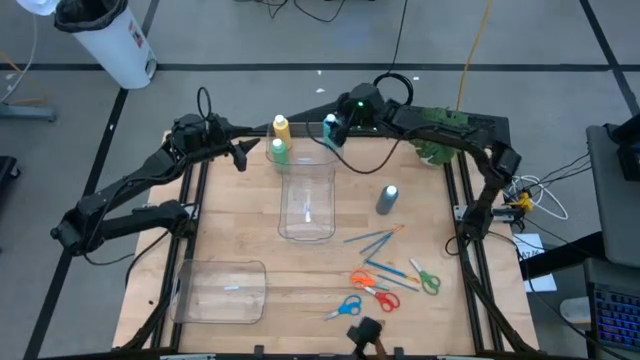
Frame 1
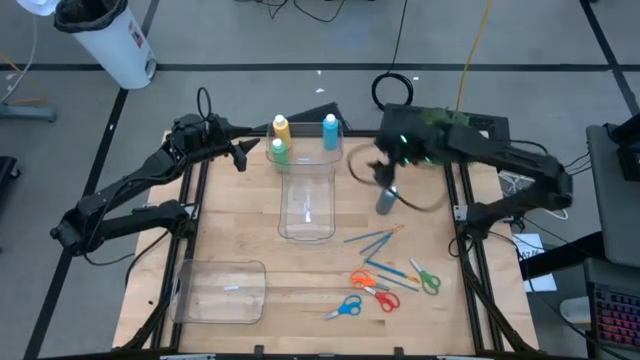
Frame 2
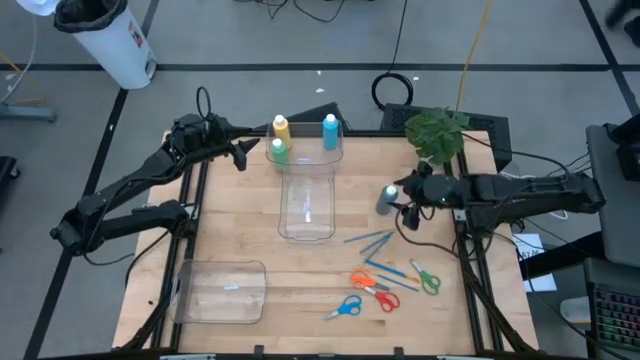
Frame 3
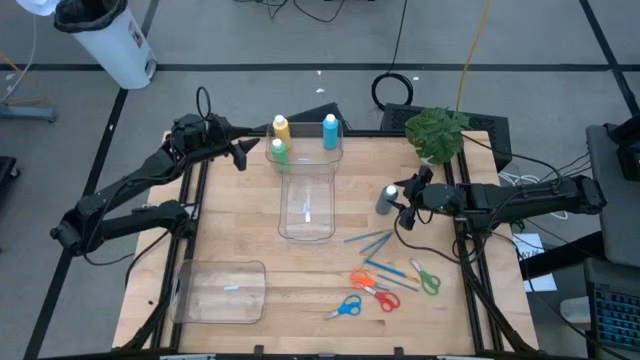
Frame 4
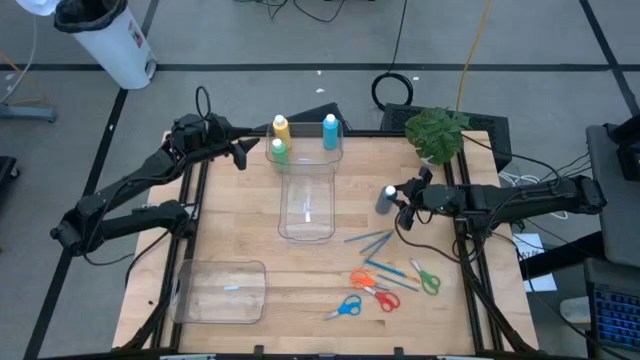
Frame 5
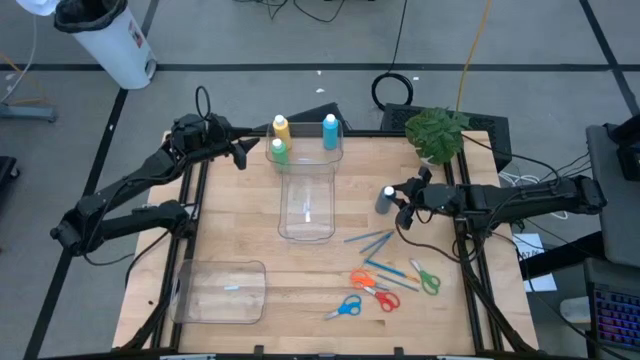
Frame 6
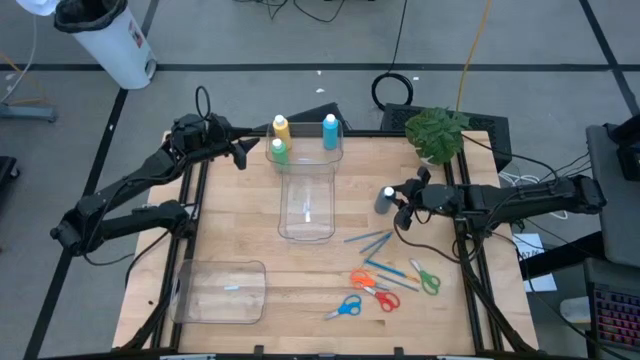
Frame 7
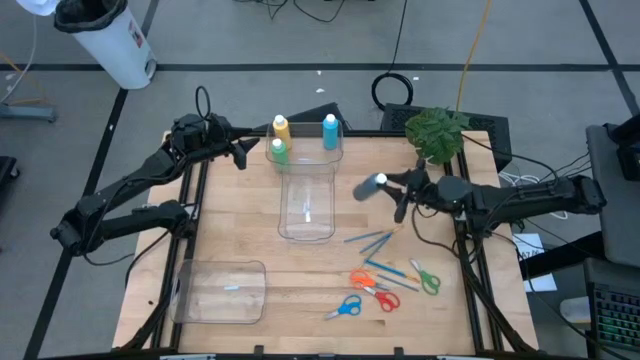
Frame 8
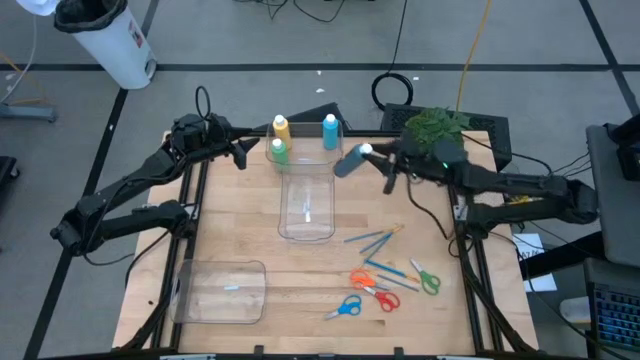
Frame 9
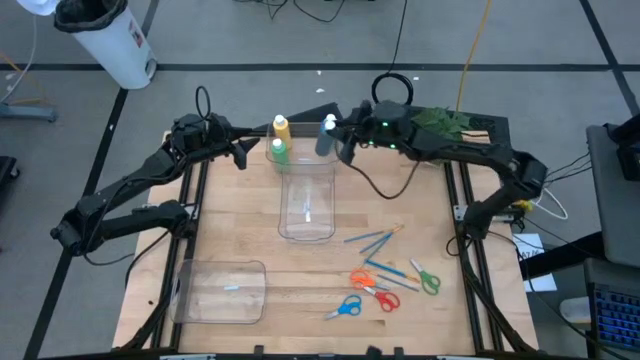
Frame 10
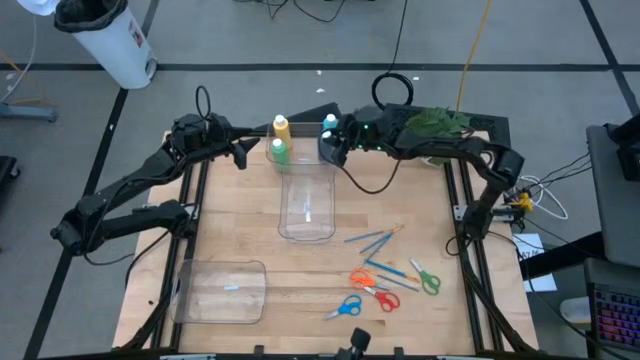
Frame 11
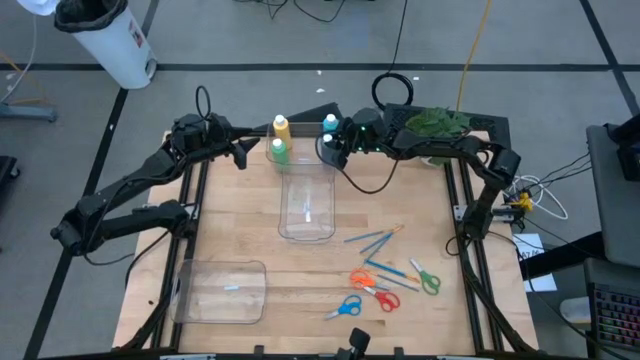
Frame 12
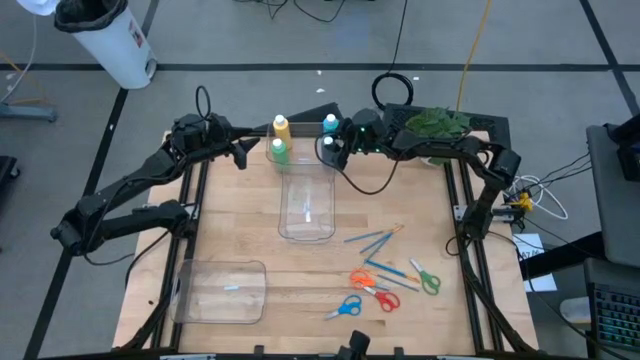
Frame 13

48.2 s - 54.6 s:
Task: Pick & Place Paint Supplies
Put the black paint bottle into the top transparent bin

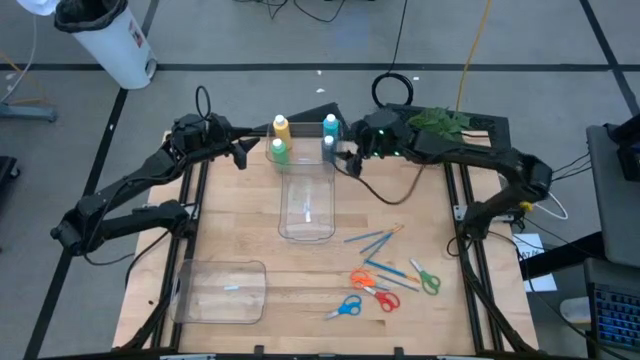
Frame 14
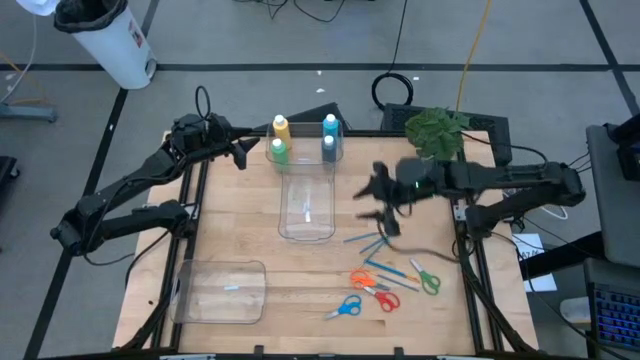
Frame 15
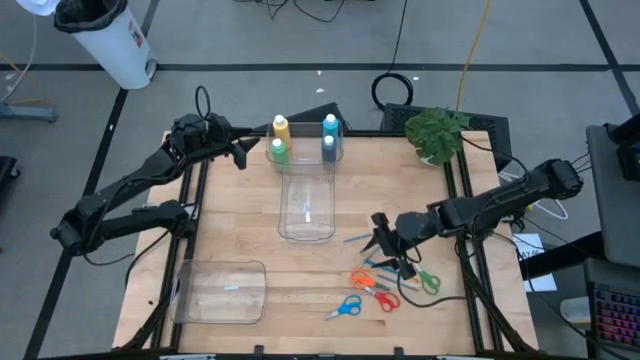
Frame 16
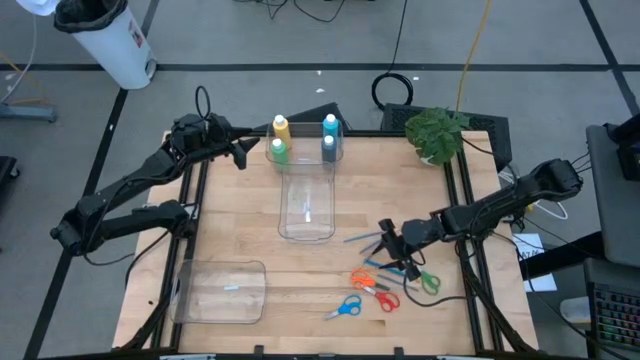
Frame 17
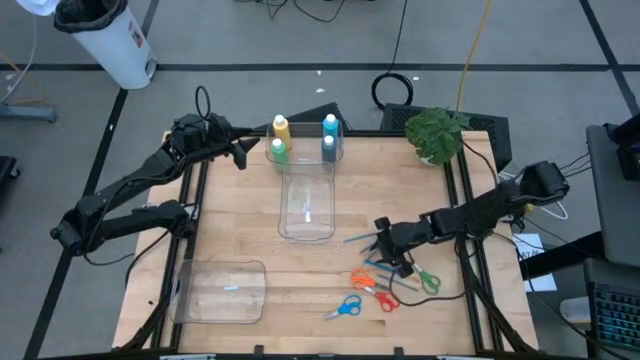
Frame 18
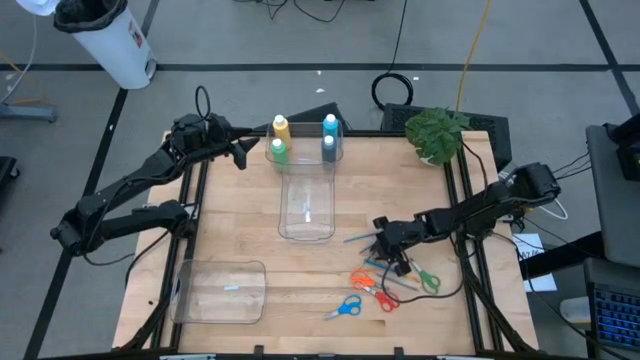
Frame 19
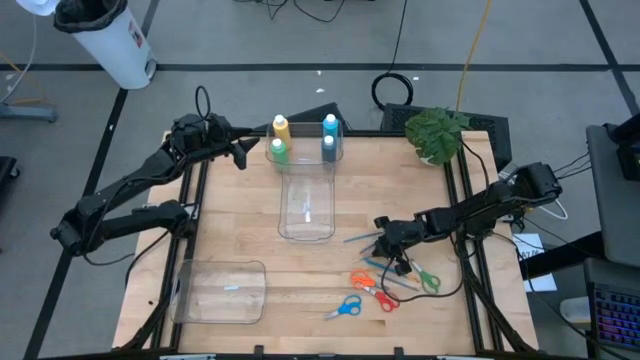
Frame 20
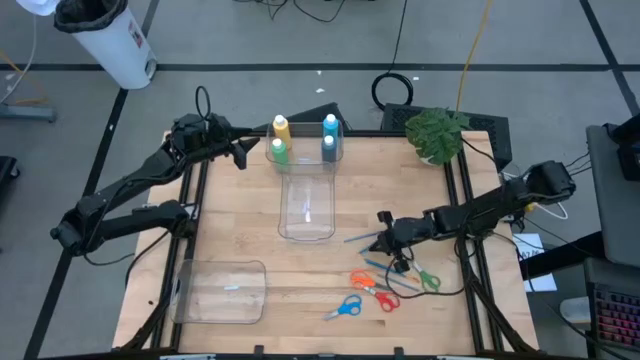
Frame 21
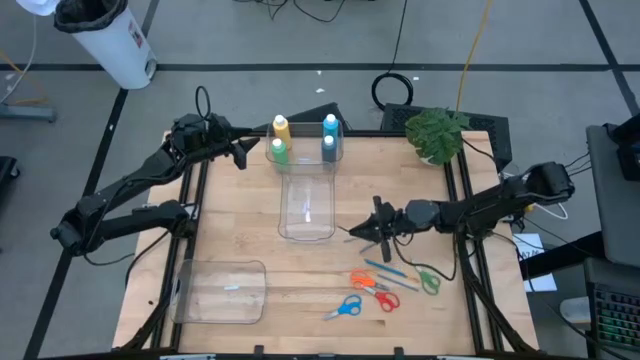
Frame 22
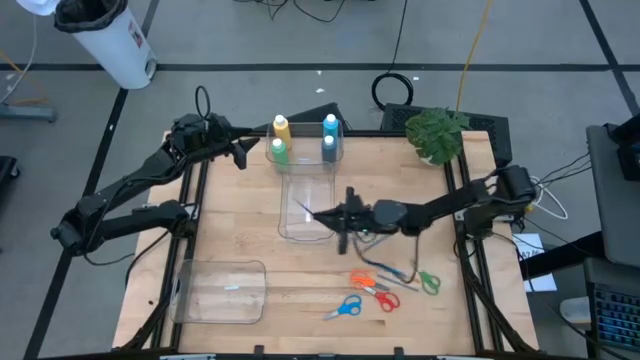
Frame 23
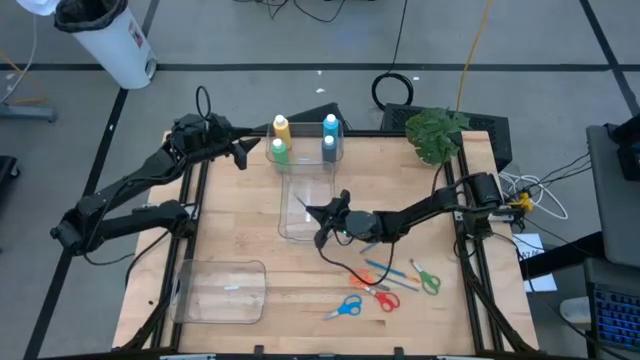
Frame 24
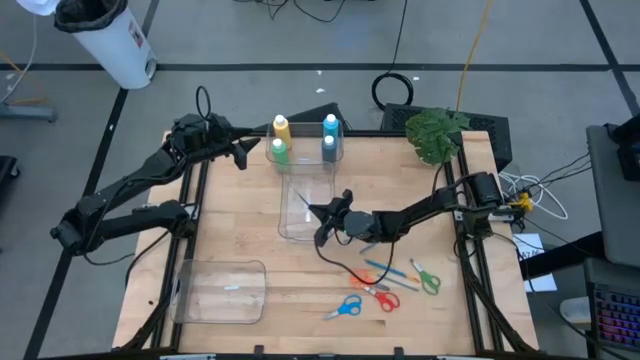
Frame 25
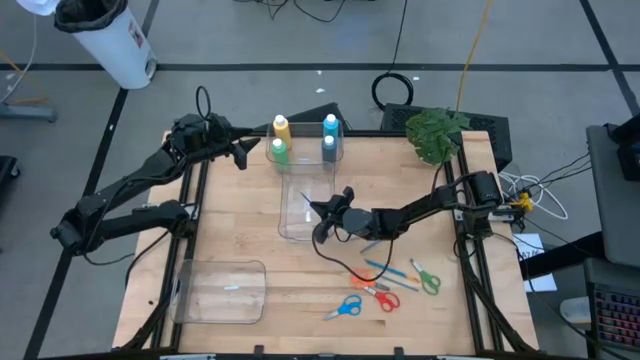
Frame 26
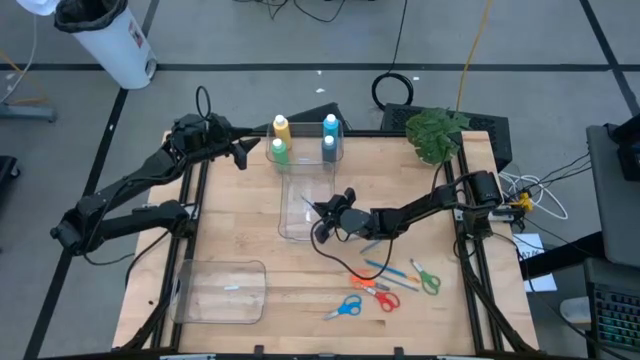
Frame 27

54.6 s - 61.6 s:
Put the blue paintbrush into the middle transparent bin

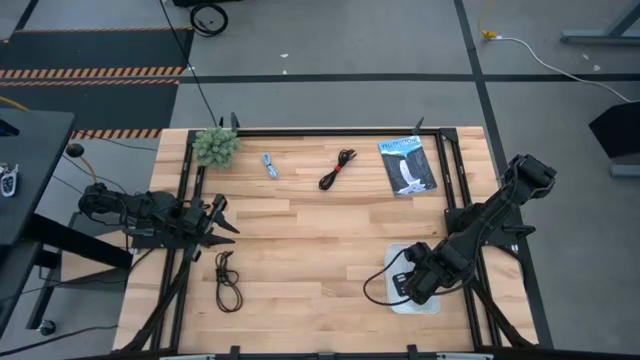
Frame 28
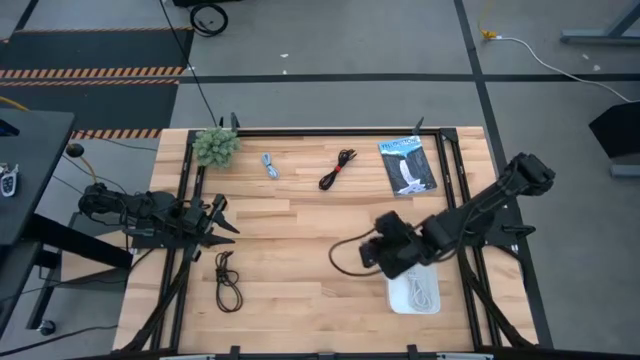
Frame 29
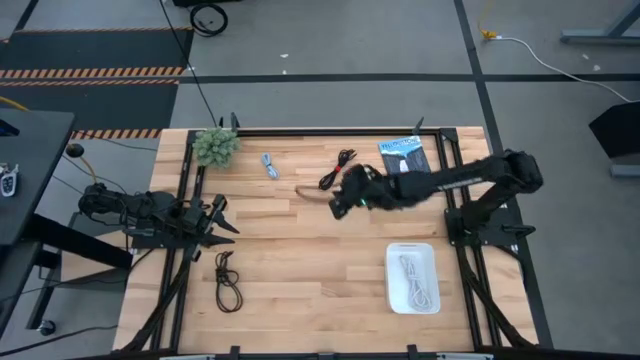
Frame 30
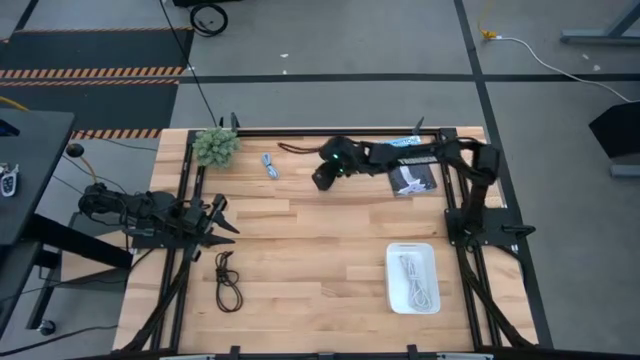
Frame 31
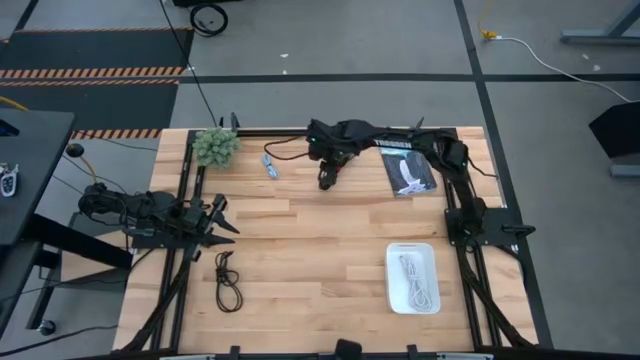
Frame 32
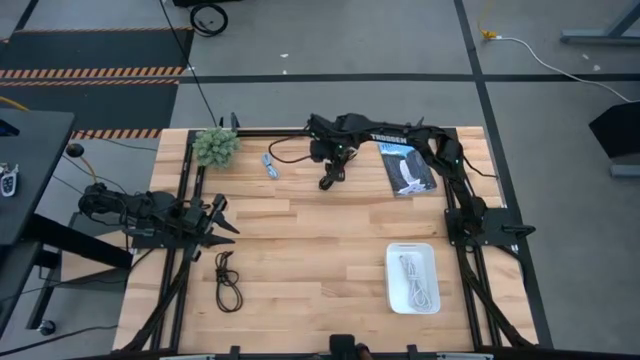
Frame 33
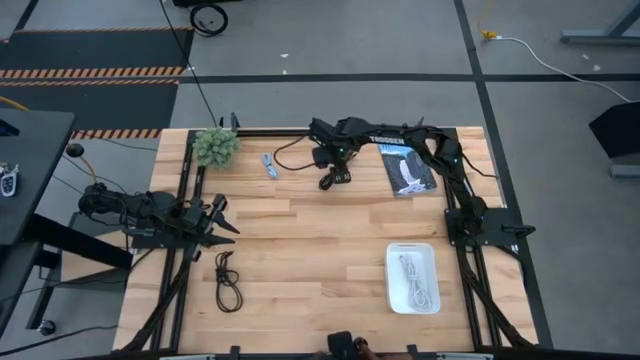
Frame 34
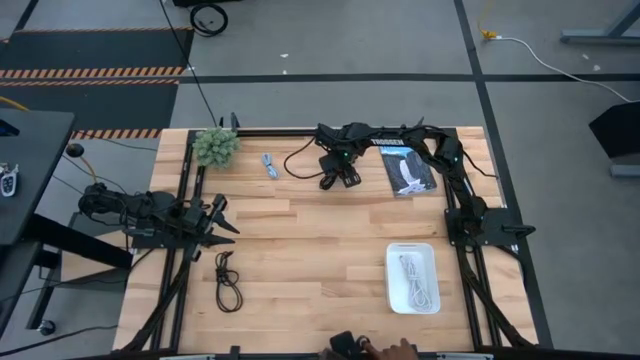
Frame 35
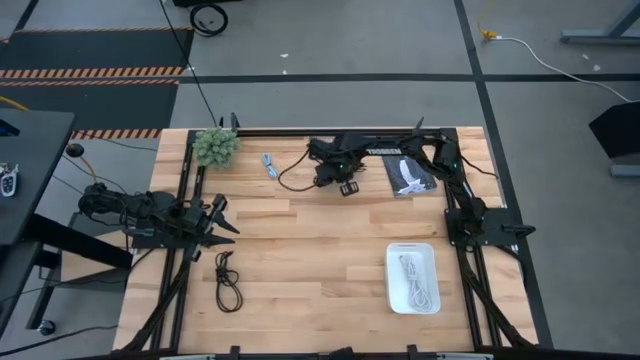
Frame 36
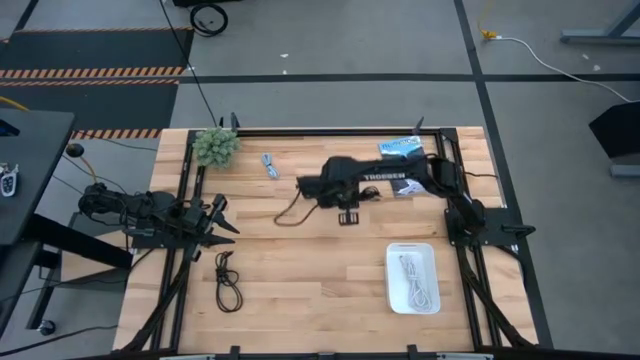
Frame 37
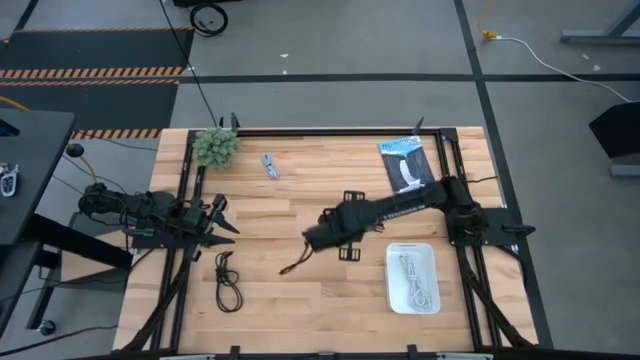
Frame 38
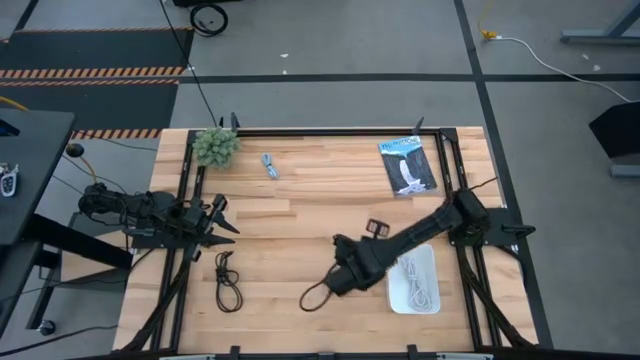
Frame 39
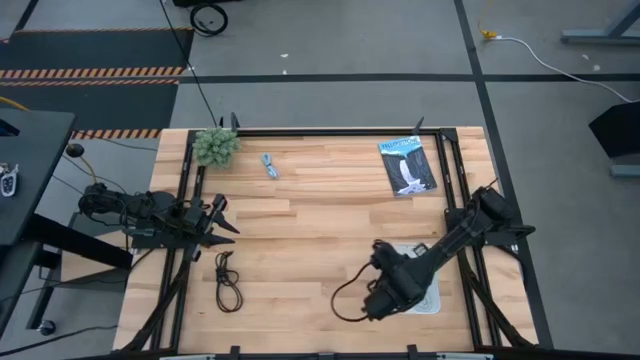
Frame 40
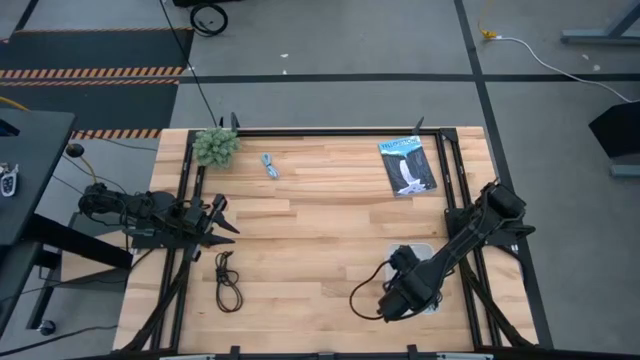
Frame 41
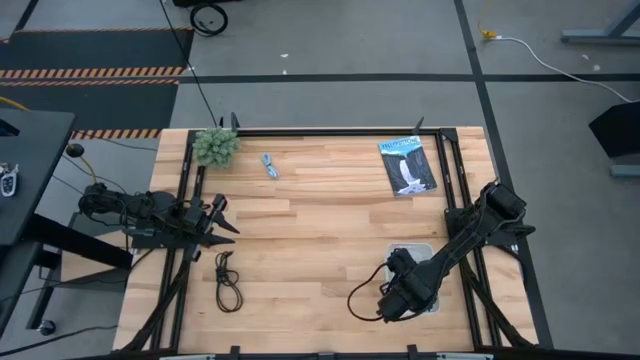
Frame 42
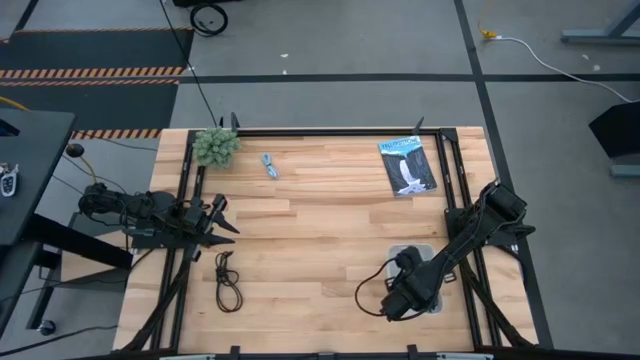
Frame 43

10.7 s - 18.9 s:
Task: Pick and place USB-C Cables
Put the top black charger cable into the white bin
